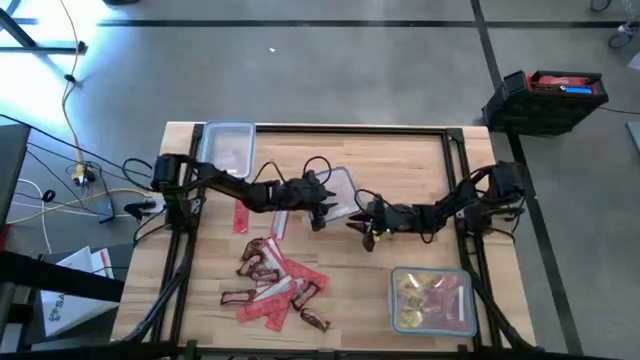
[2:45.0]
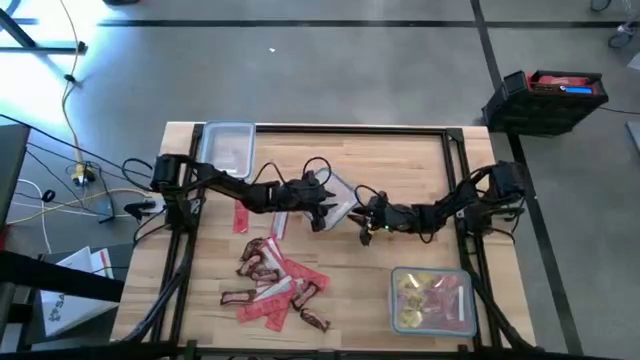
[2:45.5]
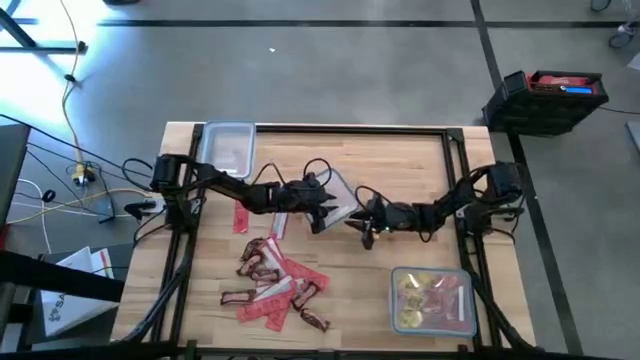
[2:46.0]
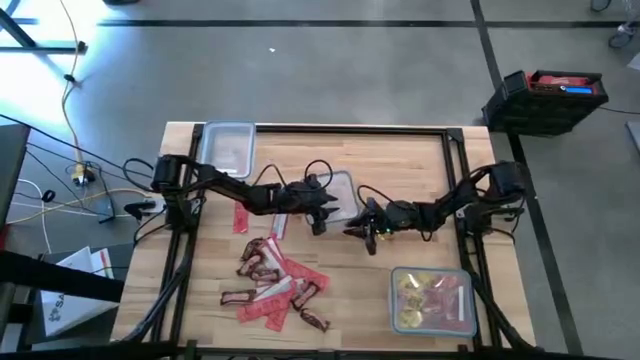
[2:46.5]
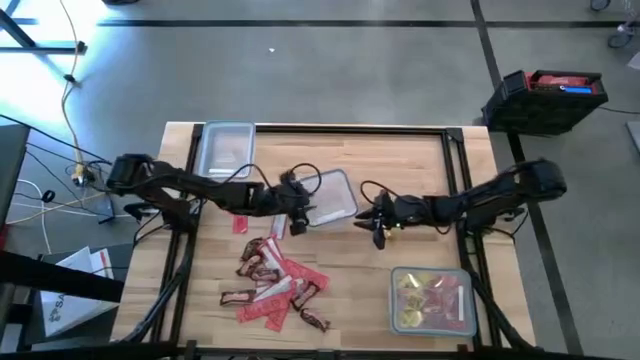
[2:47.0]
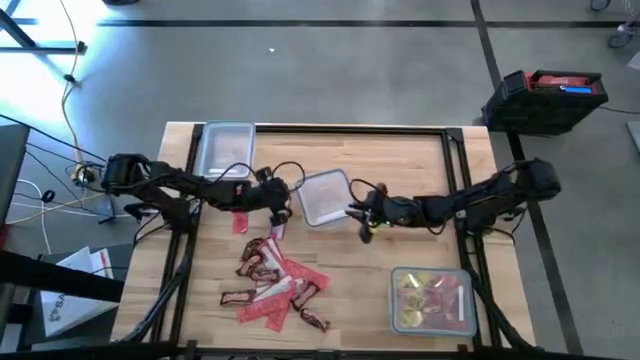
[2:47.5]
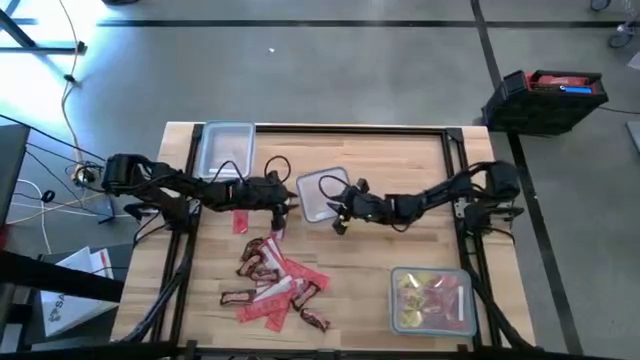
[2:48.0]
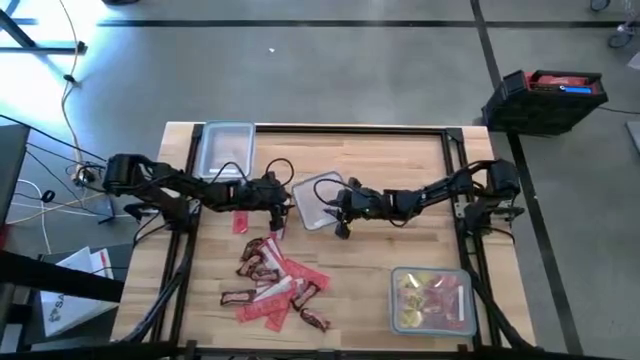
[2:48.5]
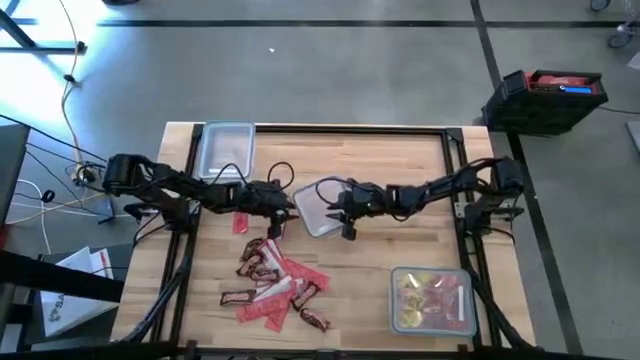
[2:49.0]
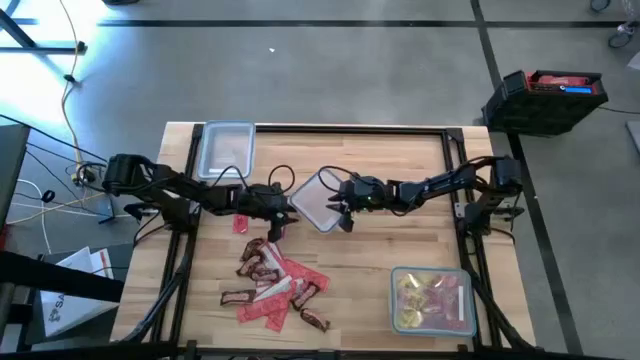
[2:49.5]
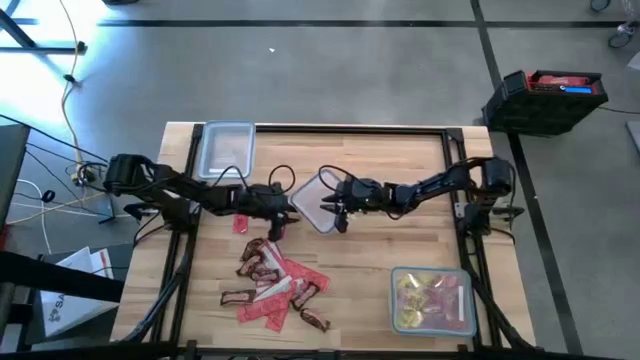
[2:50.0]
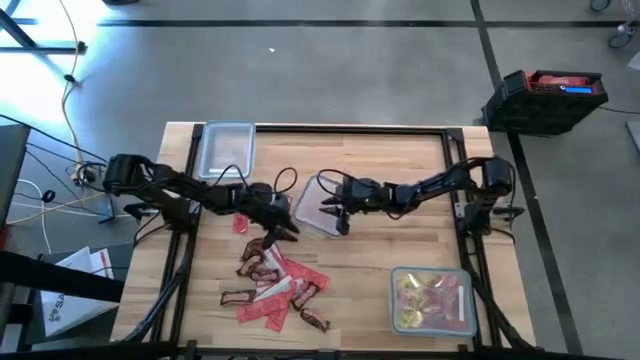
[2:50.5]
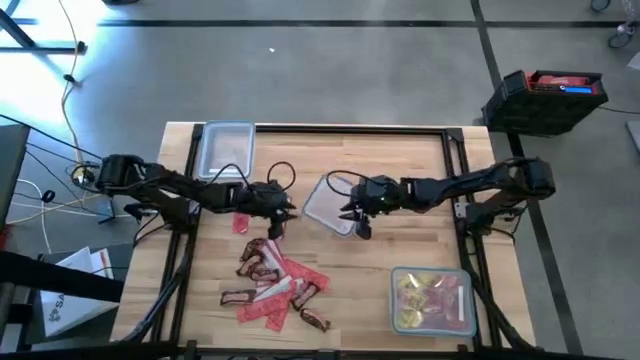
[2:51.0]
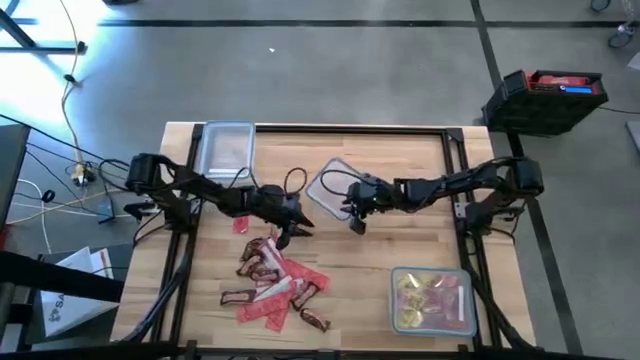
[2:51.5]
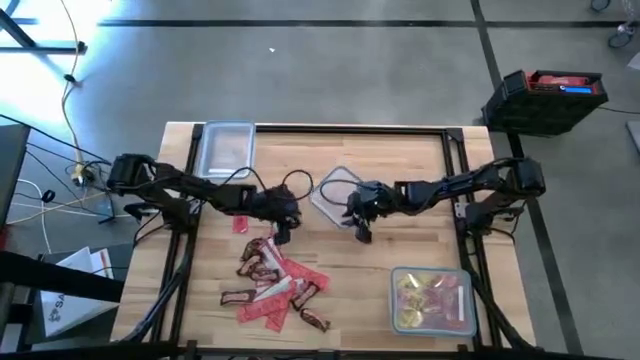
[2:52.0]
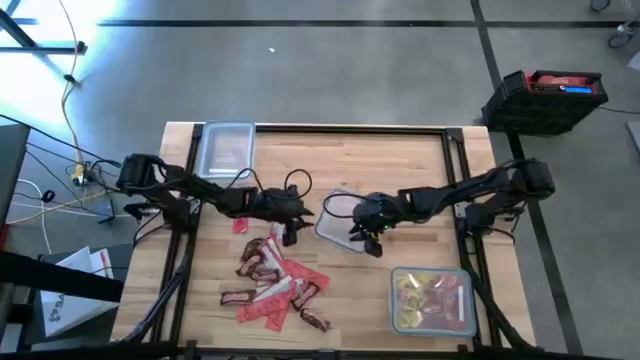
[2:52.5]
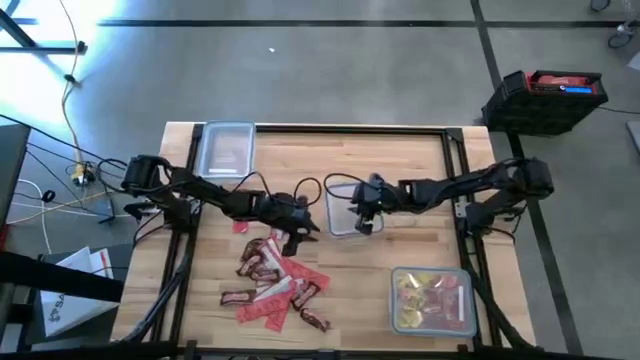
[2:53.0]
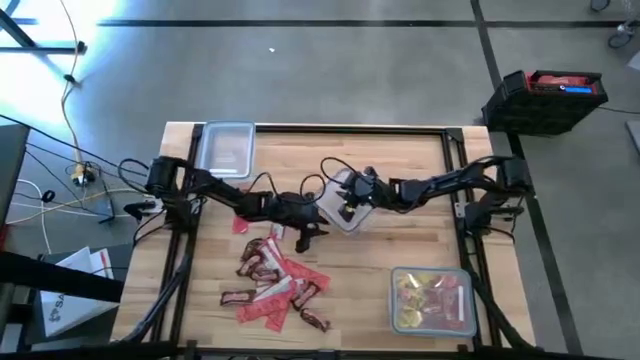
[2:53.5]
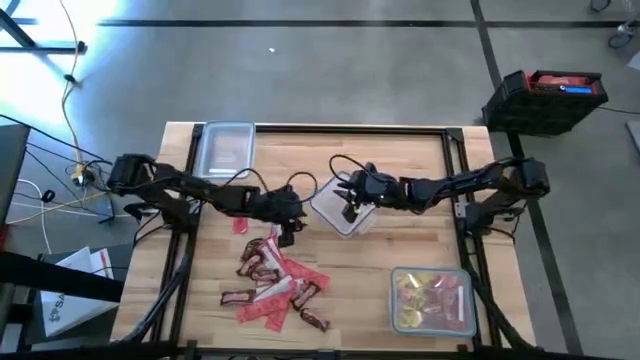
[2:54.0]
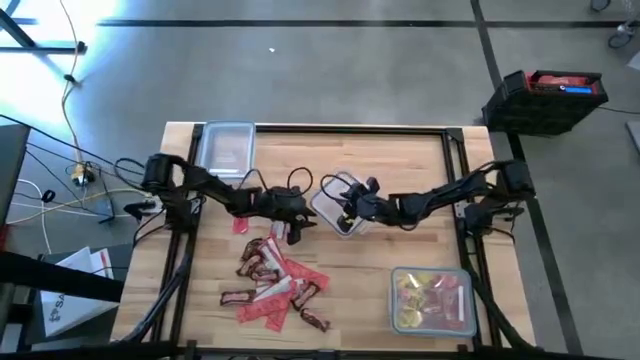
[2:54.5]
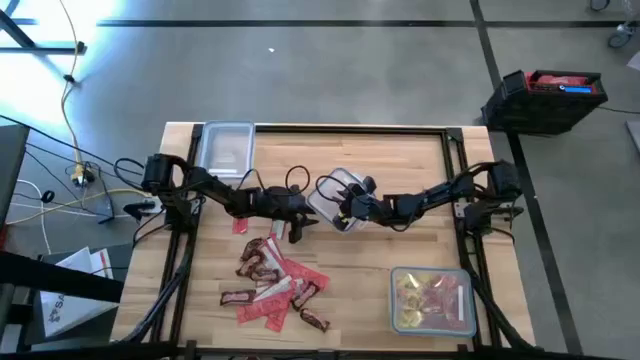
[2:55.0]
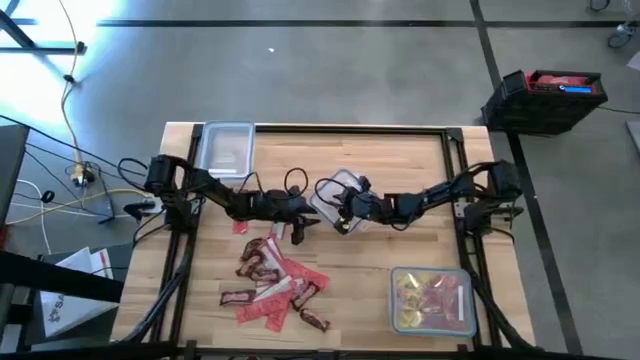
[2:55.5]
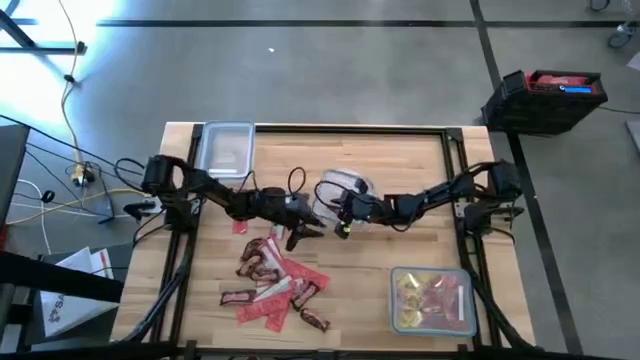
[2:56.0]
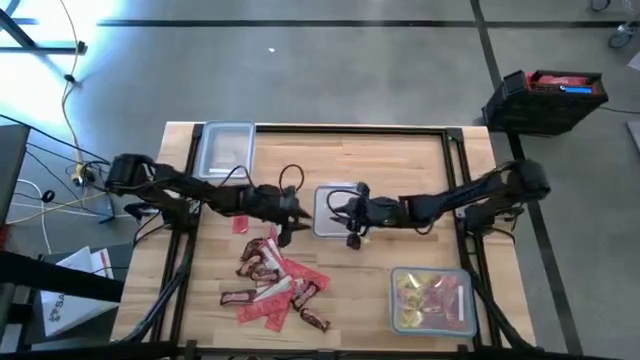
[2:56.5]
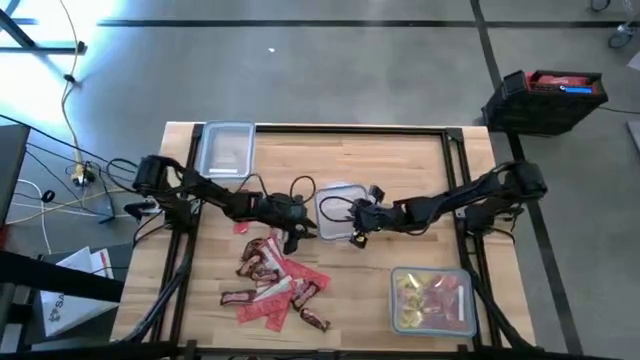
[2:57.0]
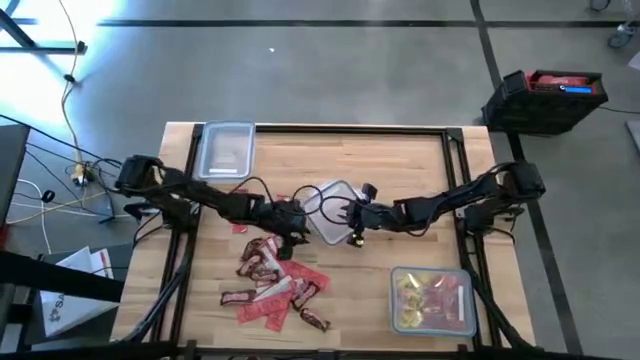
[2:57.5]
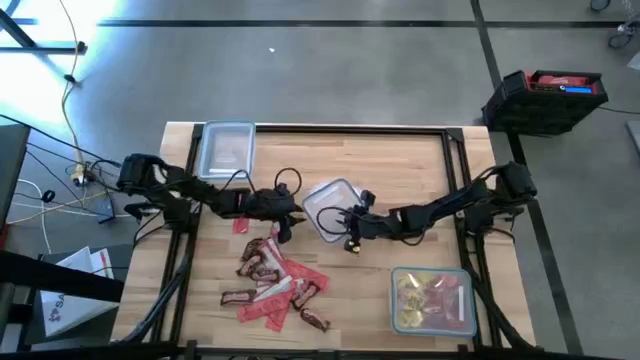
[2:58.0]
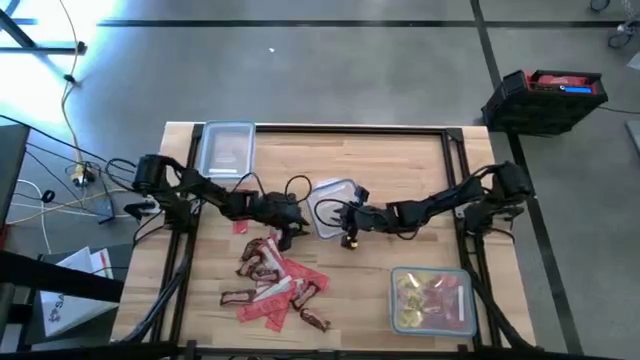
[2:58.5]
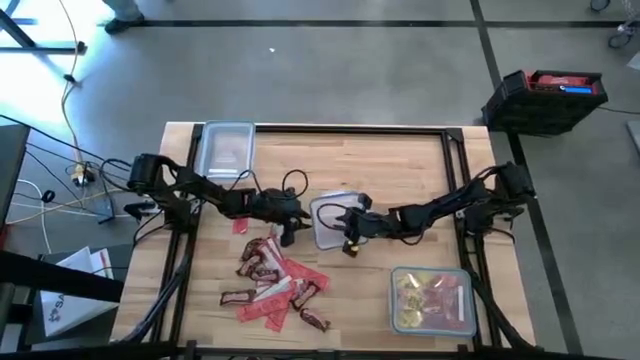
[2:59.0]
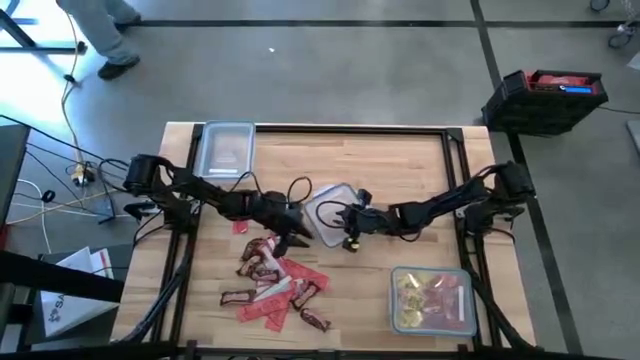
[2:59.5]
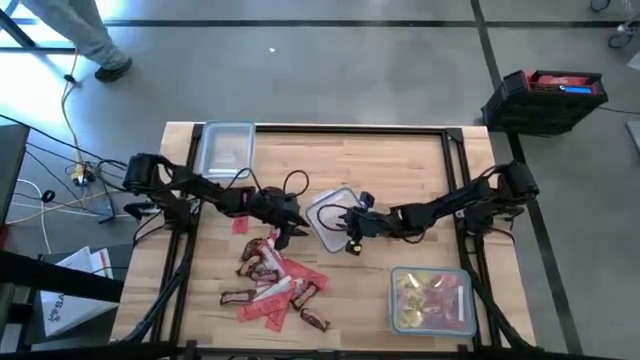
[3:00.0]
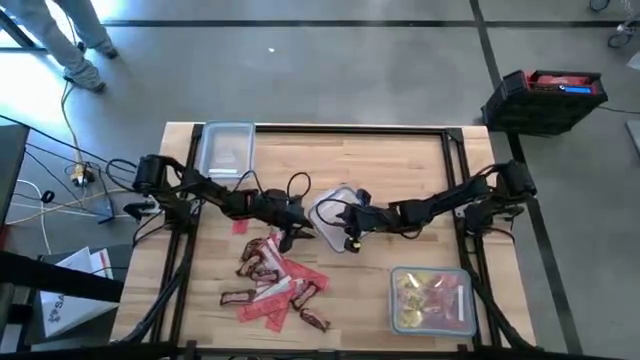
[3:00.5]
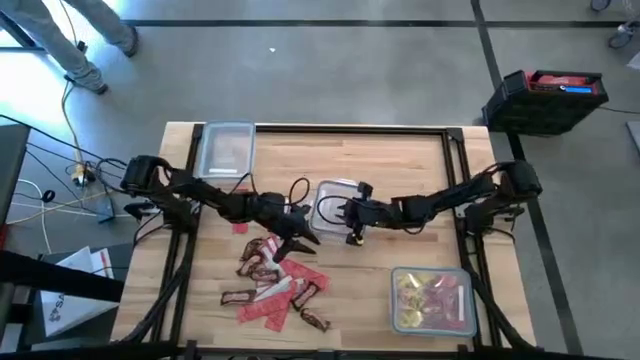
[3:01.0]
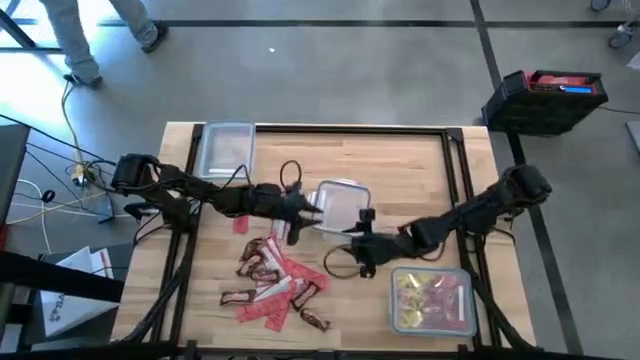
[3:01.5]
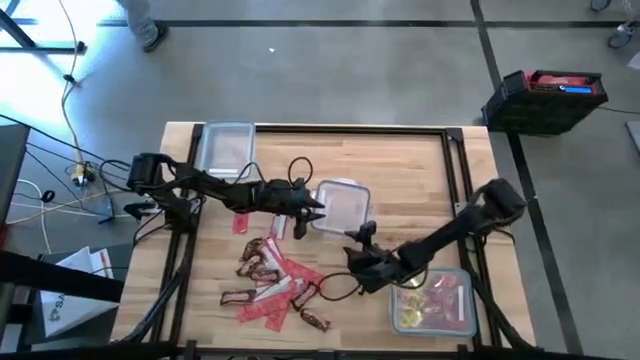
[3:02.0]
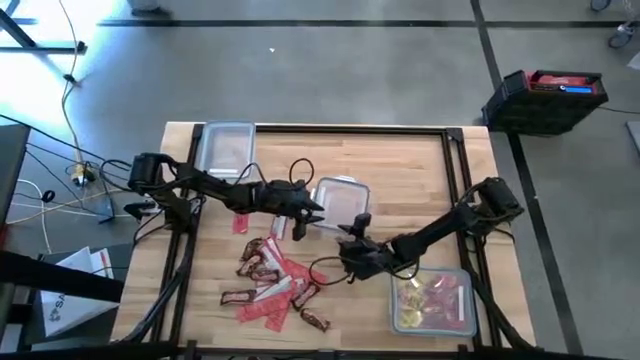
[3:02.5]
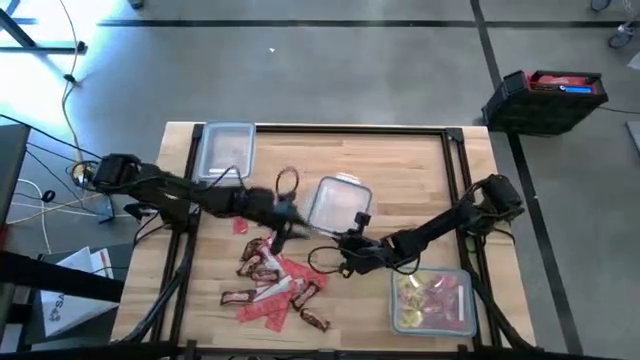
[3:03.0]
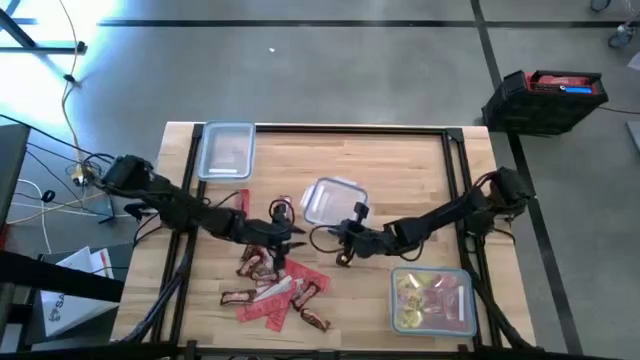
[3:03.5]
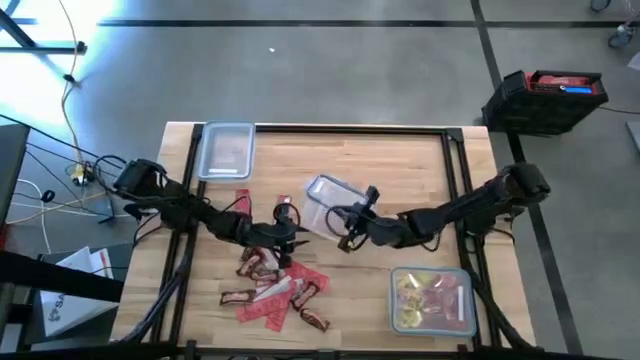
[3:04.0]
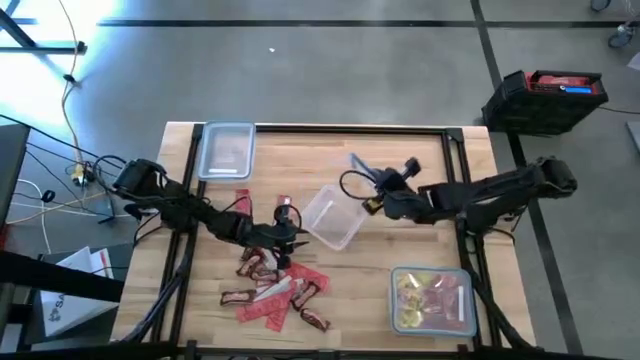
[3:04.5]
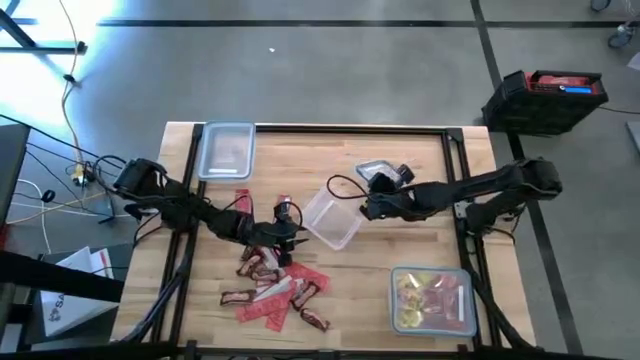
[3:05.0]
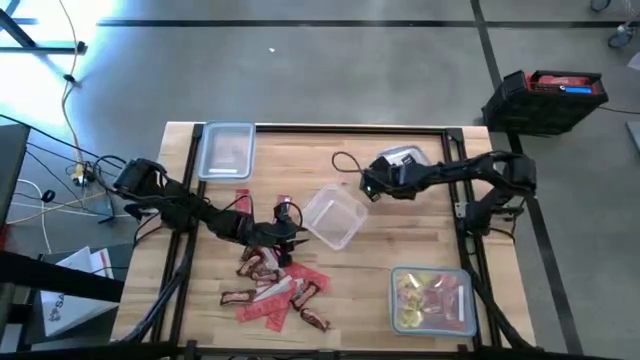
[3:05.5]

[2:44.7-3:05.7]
Task: Sort candy
Open the transparent bin
